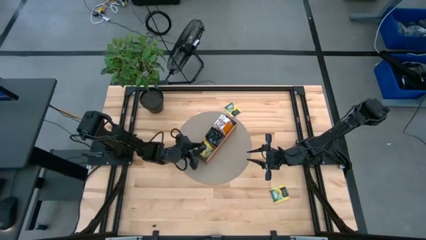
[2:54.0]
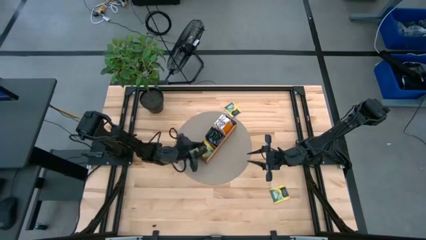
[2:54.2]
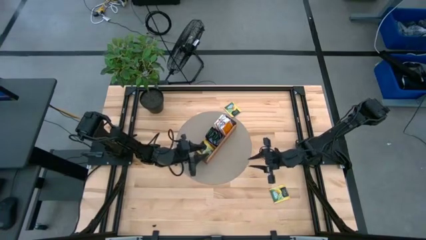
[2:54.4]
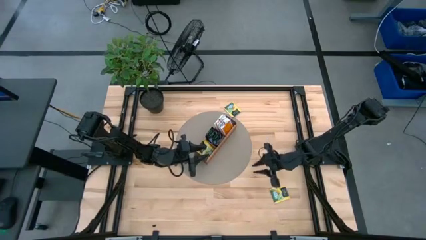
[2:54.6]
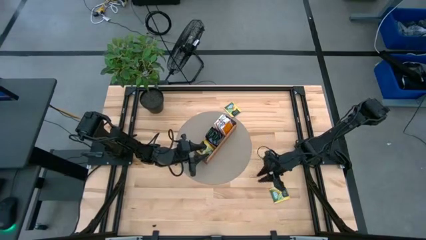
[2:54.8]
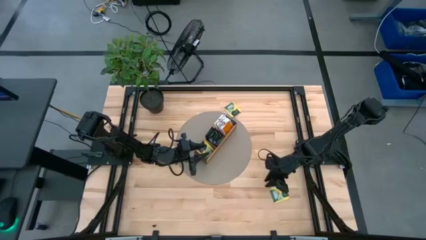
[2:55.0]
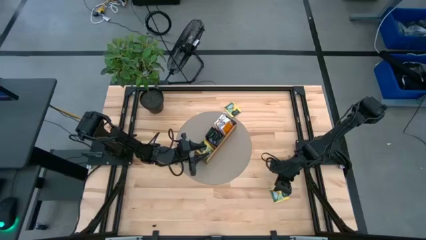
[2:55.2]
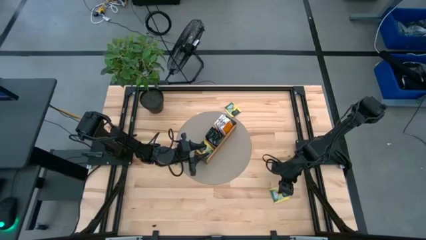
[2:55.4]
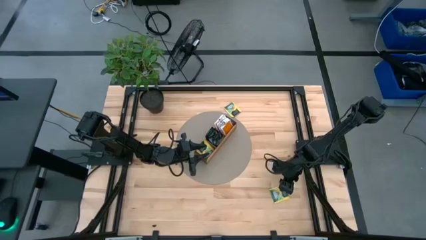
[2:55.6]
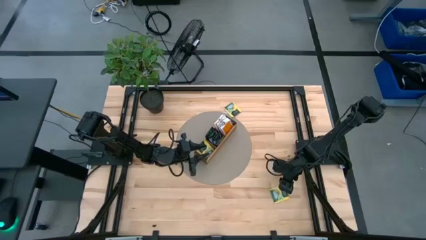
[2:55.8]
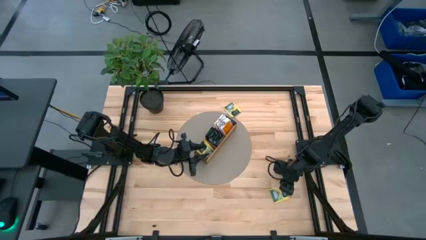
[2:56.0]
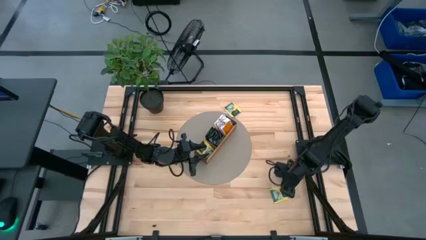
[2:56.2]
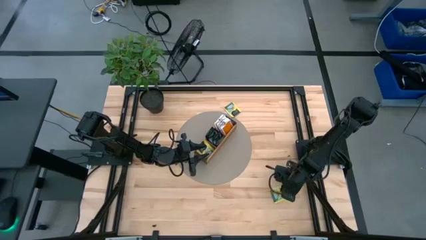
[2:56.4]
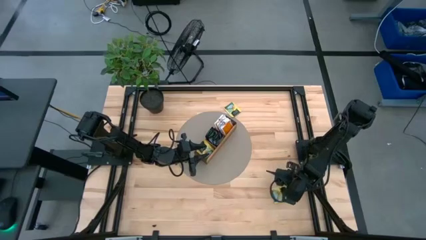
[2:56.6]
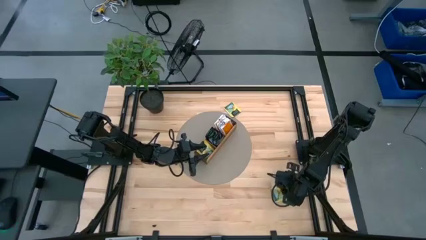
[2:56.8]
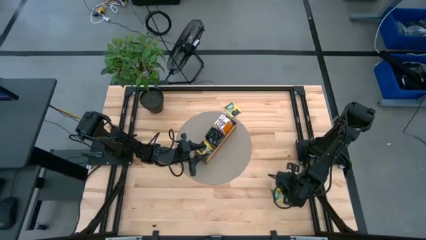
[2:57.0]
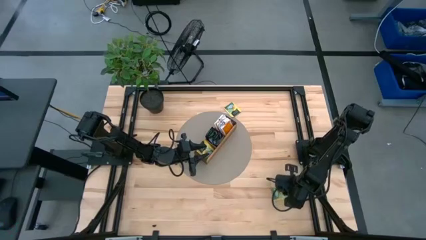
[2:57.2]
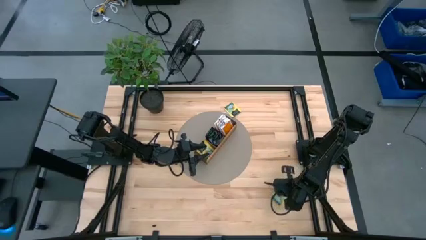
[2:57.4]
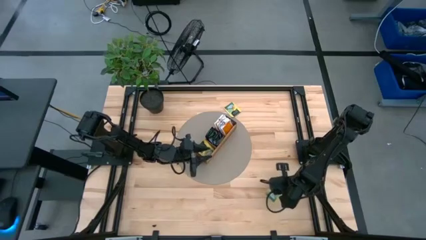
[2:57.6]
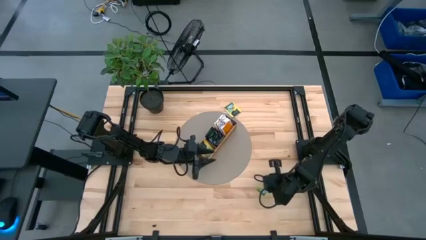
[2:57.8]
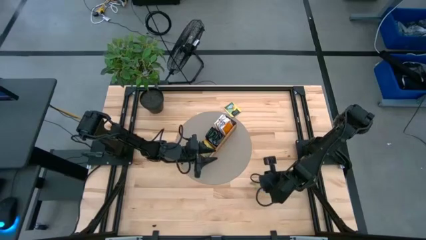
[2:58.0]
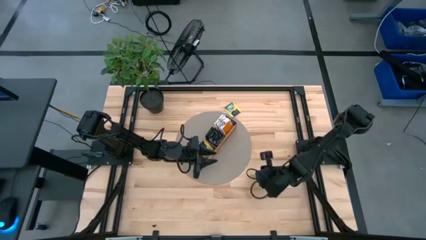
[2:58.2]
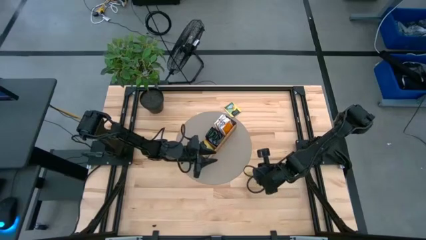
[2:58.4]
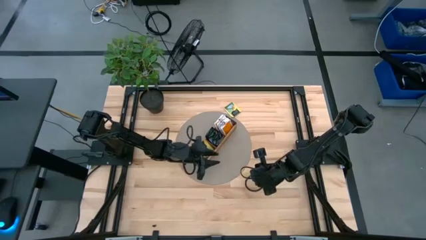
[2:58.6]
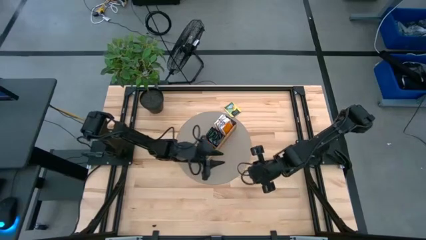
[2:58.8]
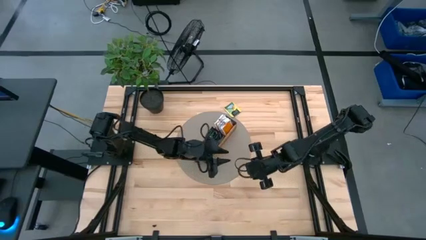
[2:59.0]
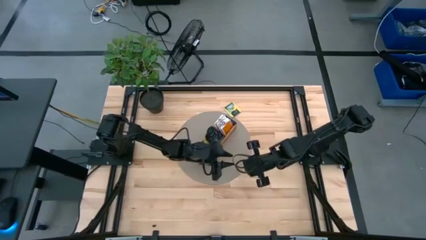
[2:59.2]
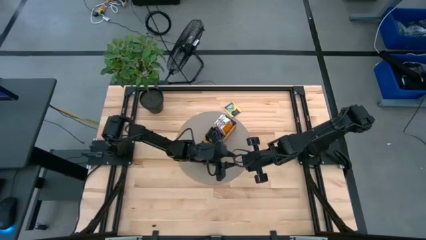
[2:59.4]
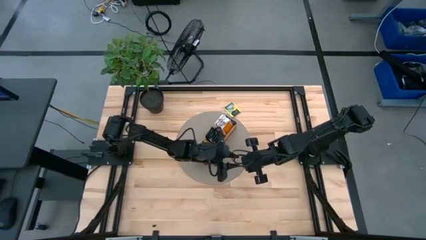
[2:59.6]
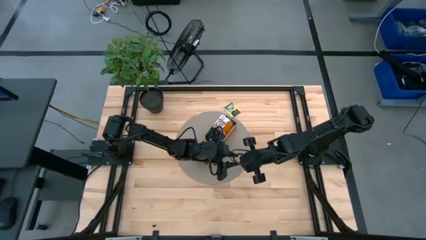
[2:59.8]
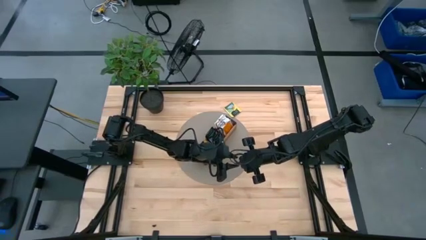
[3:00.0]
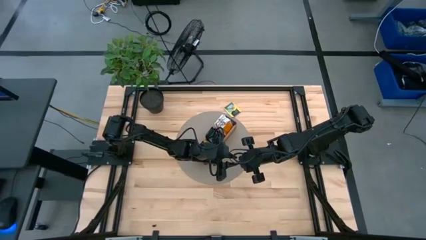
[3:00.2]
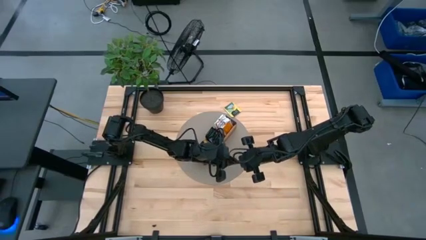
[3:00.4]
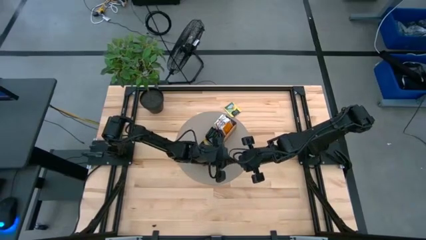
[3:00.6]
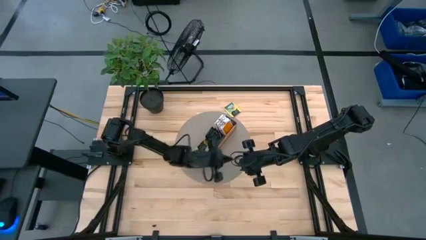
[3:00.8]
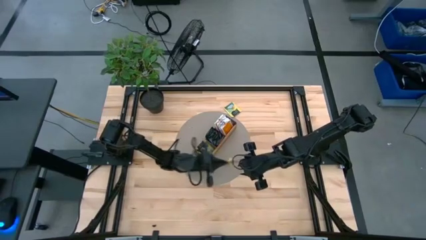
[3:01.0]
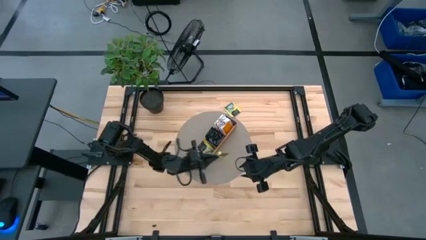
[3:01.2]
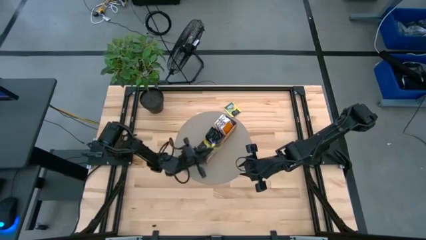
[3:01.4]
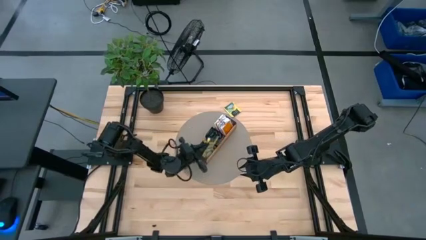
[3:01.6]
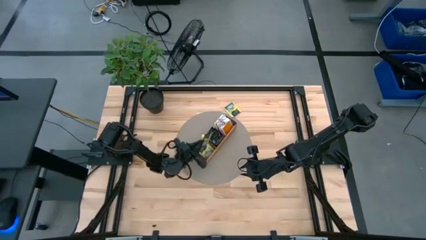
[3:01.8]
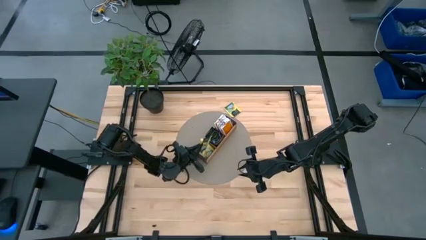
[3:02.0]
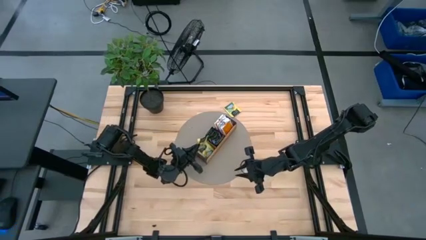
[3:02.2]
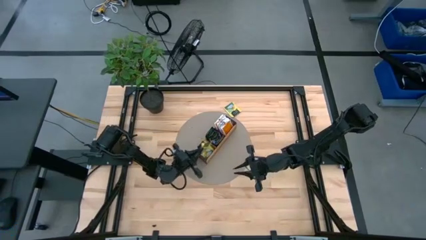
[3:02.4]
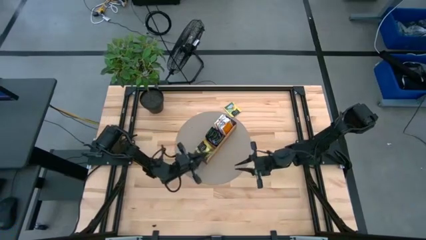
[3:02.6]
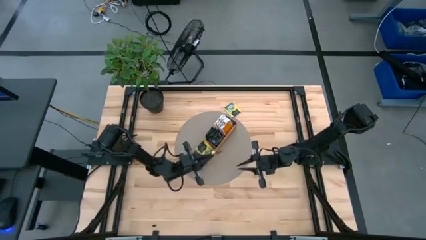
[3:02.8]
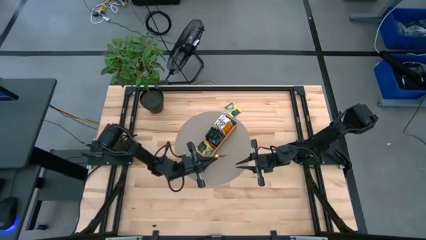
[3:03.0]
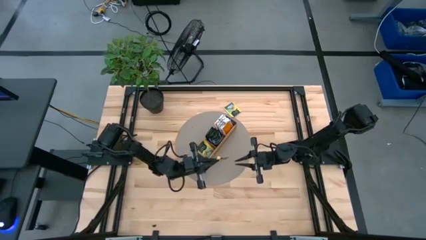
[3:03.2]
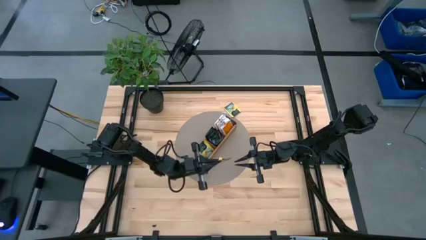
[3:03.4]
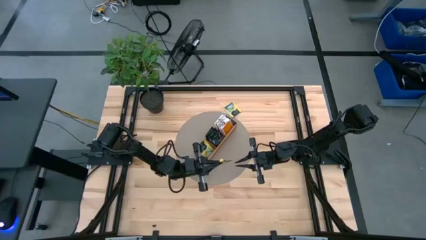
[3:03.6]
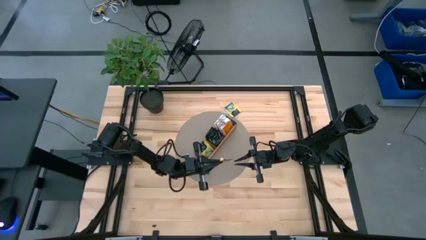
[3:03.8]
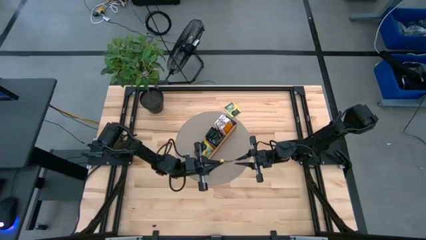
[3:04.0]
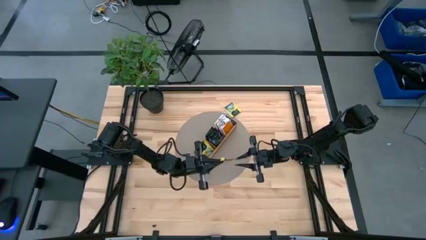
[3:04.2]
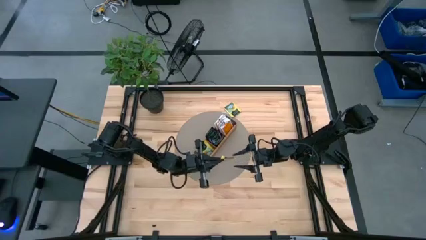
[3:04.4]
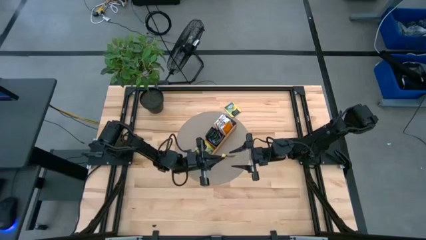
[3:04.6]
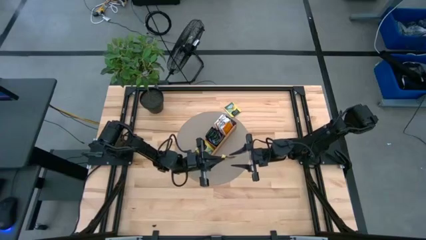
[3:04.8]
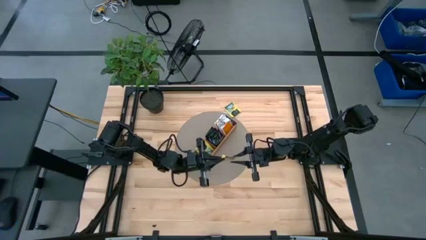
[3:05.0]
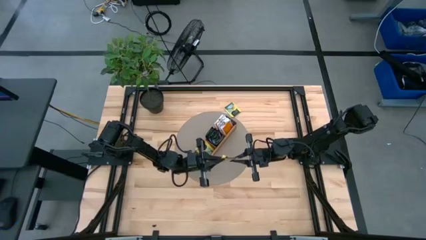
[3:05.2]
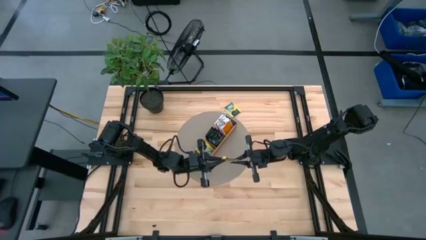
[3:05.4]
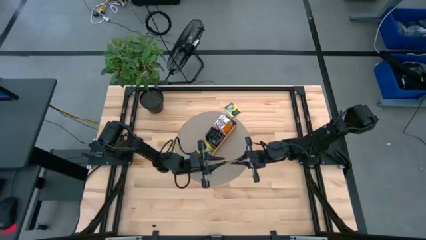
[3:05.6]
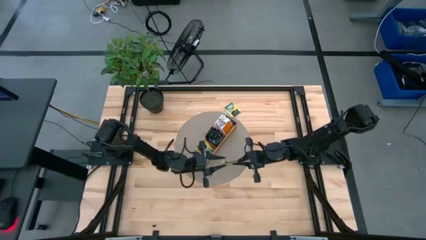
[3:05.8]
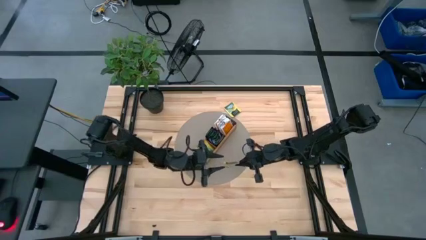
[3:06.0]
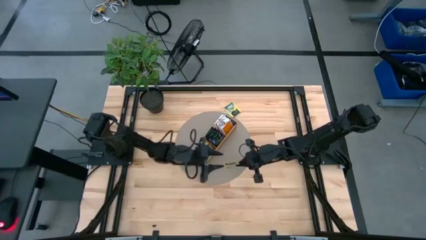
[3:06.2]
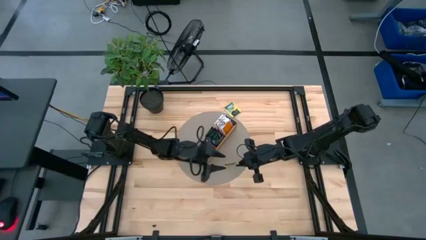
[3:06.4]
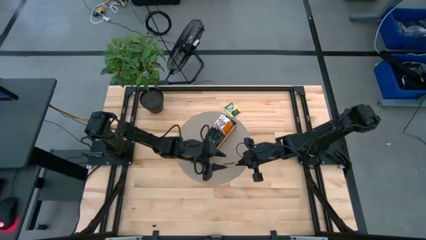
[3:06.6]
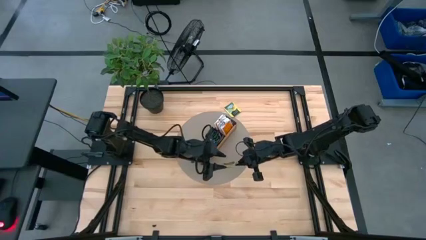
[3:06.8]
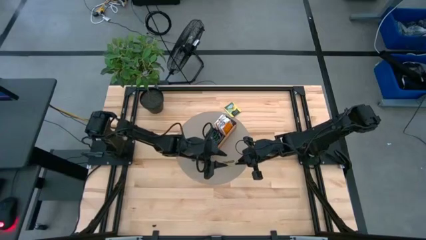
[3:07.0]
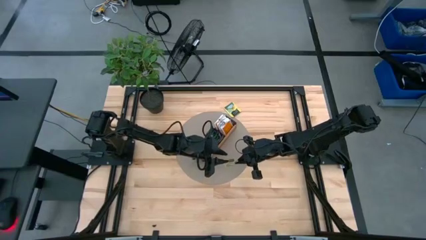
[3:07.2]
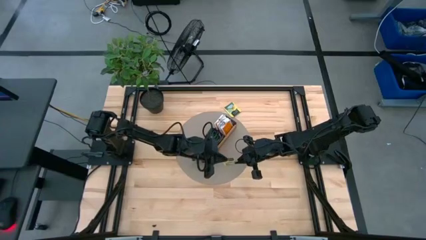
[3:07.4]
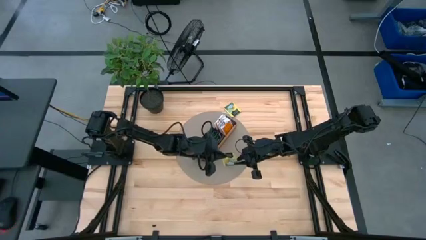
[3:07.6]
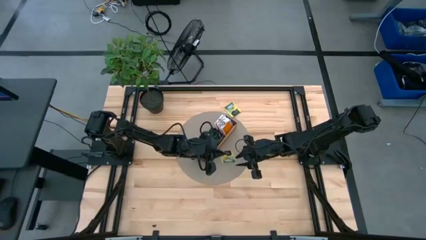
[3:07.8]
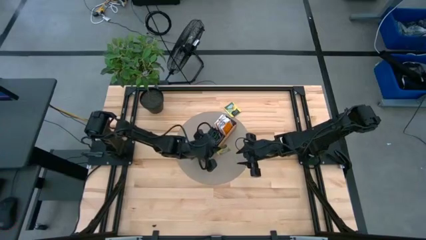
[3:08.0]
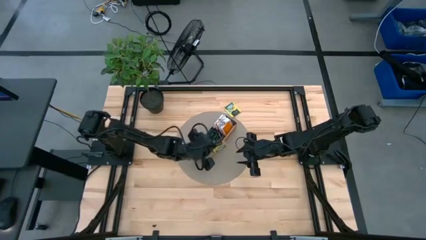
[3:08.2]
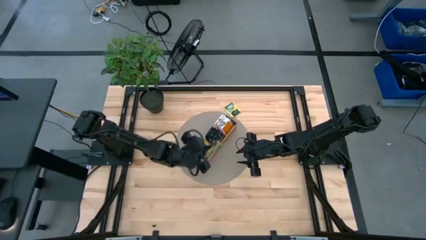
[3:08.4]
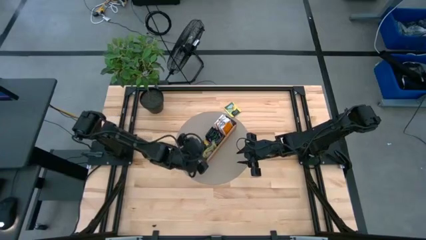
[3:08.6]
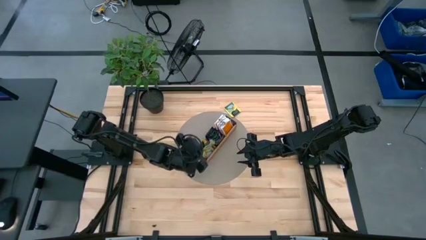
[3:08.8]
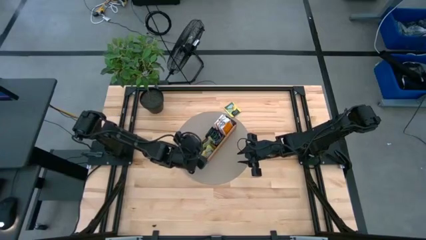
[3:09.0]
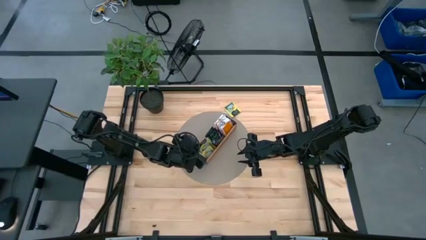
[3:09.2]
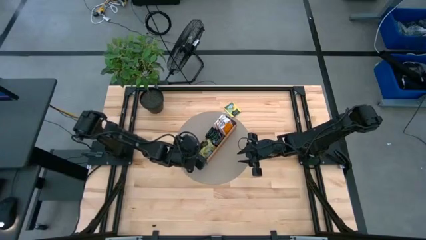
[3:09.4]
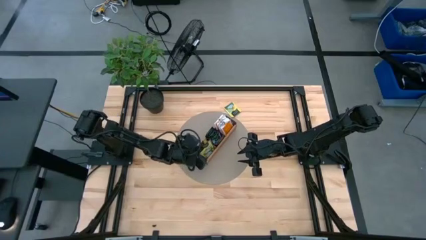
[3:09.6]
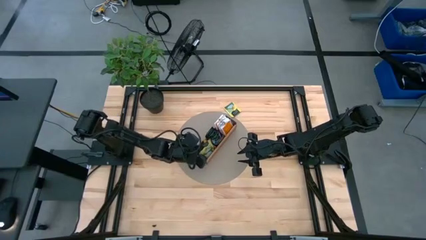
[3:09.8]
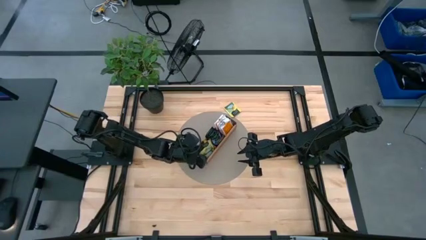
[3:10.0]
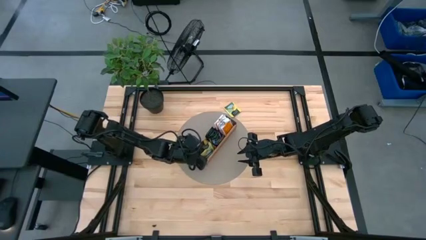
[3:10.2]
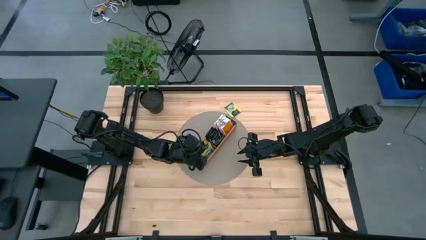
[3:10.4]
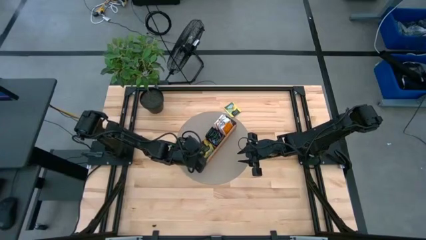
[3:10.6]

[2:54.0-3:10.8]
Task: Pick & Place Tea
Put the yellow tea bag into the left section of the wooden organizer
